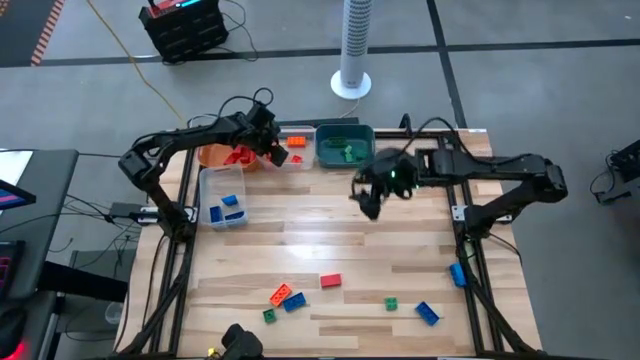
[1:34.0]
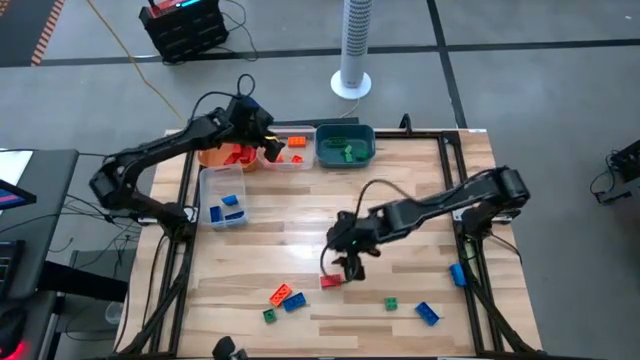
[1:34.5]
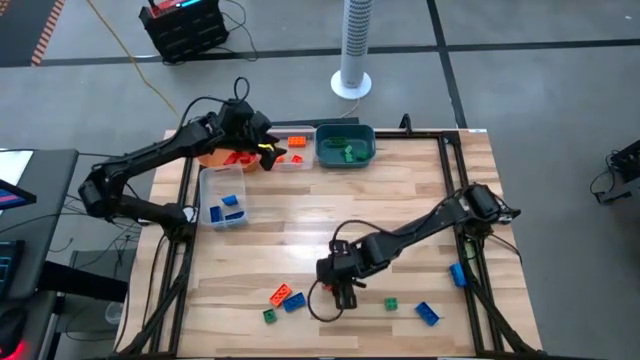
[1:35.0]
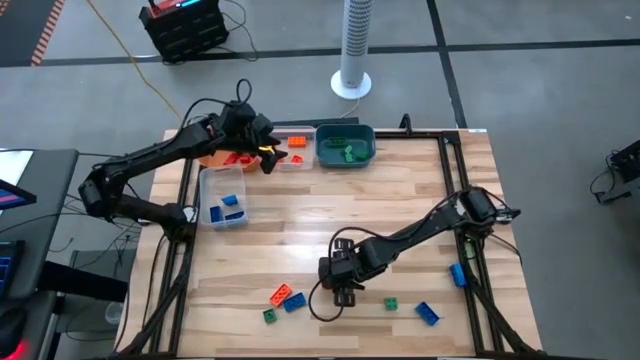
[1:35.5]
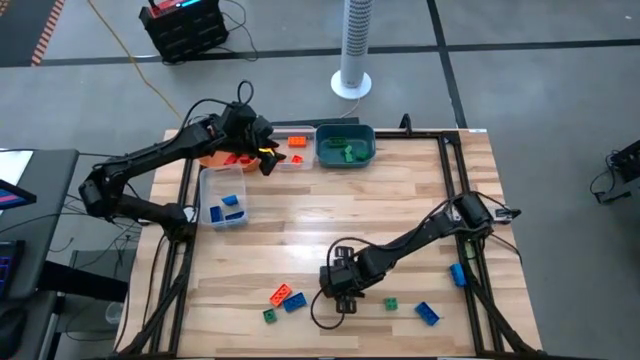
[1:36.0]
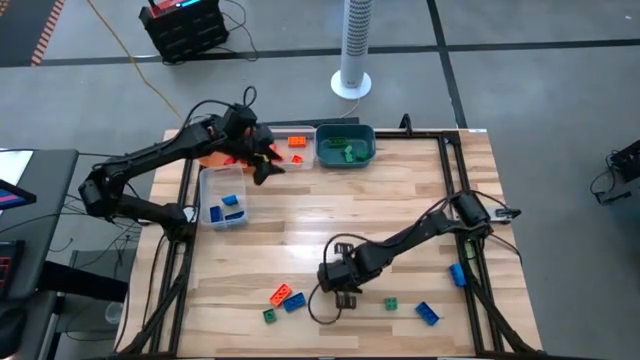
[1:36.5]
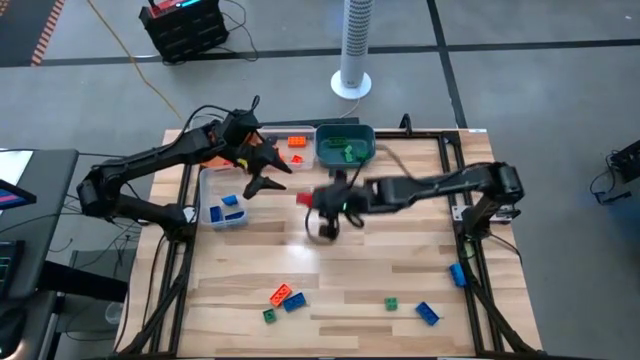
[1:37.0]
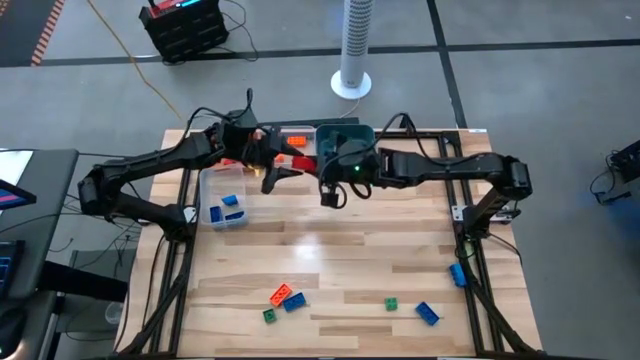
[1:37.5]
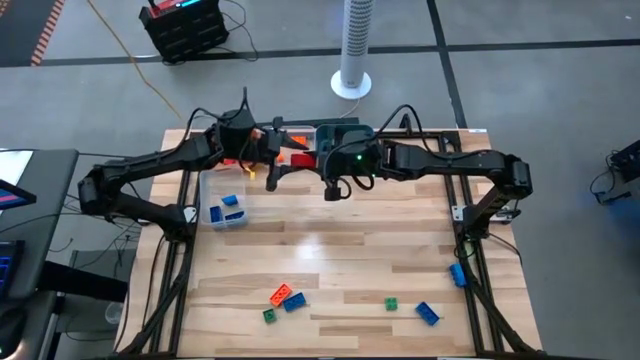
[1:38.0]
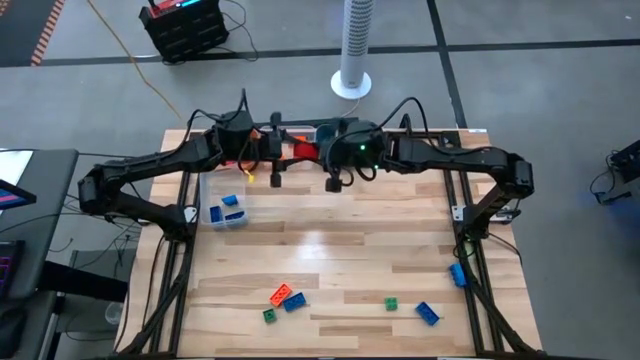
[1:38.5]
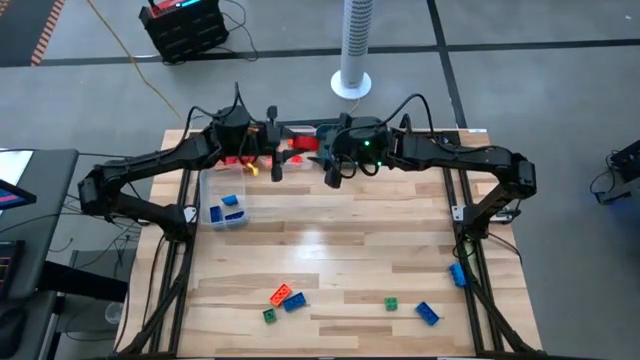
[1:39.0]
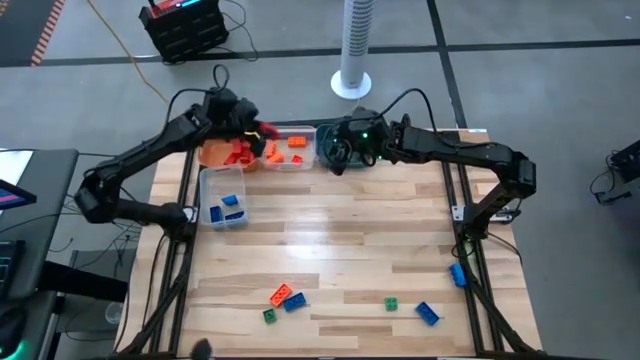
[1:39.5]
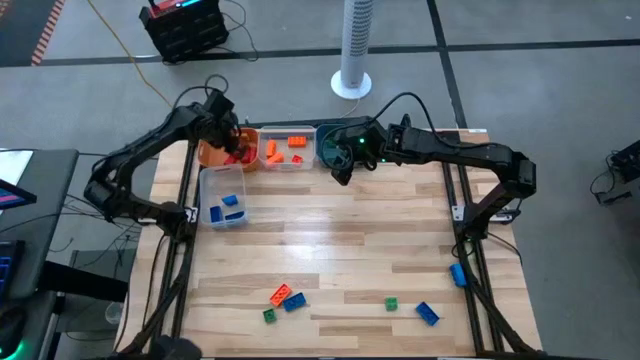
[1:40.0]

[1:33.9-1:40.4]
Task: Sort blocks
Put the red block into the orange bin

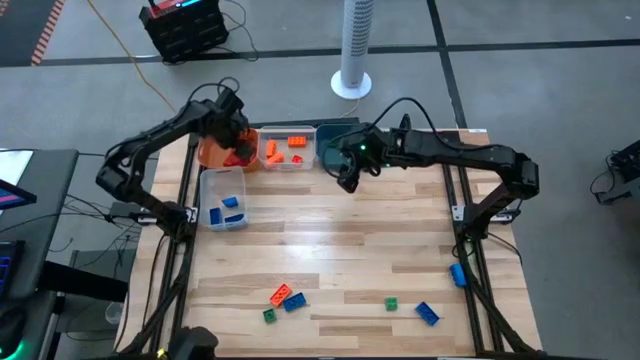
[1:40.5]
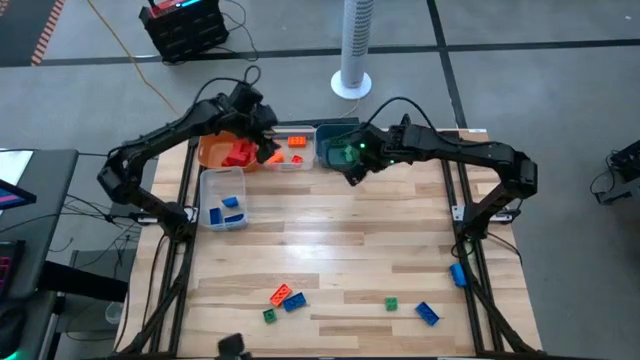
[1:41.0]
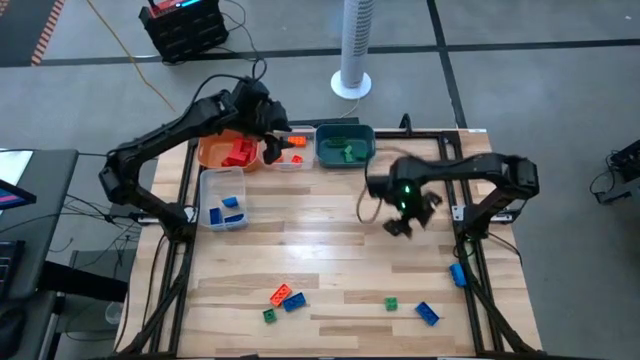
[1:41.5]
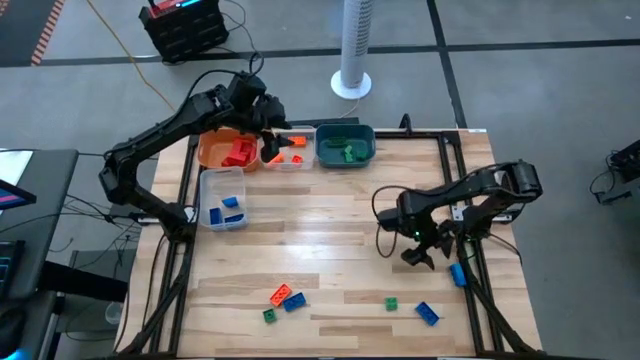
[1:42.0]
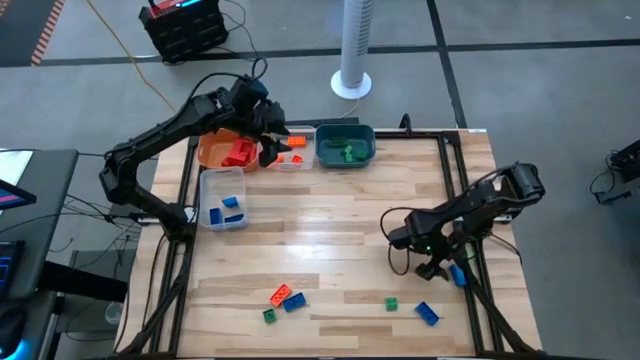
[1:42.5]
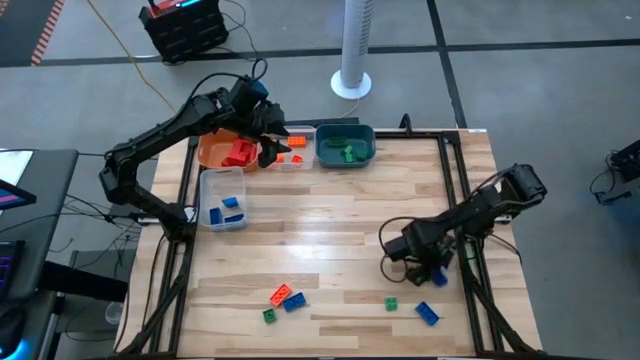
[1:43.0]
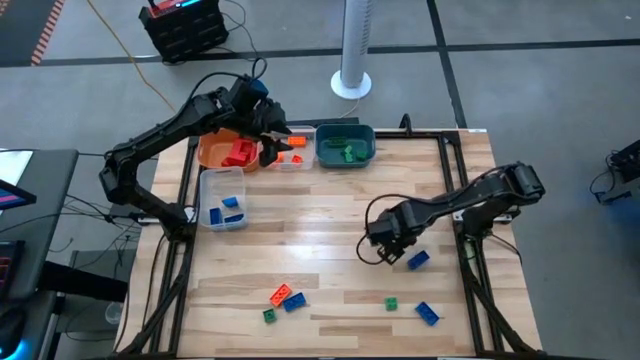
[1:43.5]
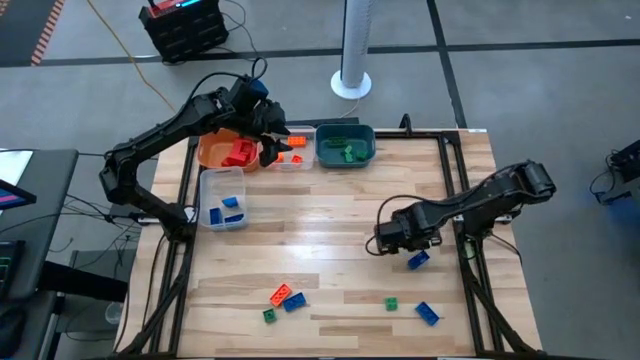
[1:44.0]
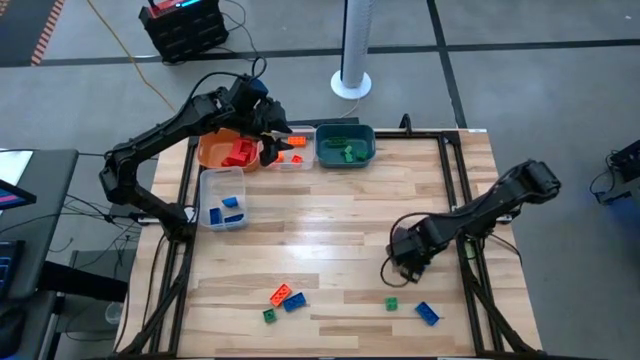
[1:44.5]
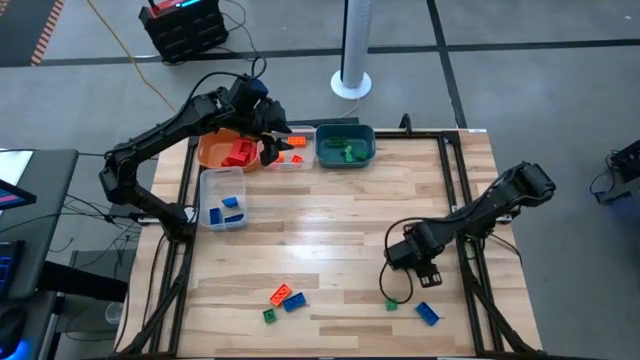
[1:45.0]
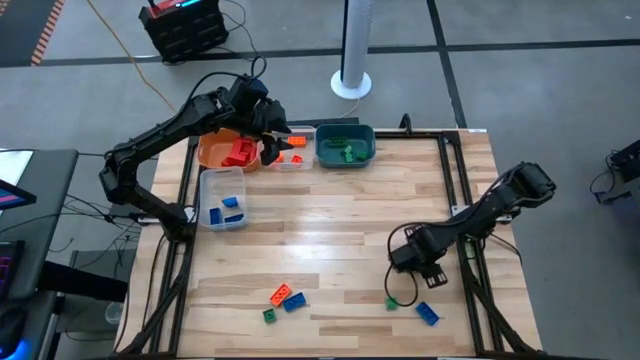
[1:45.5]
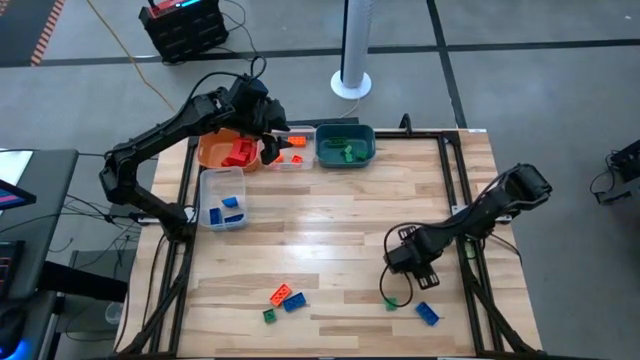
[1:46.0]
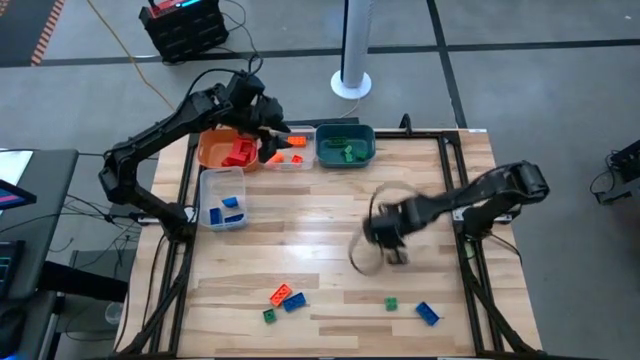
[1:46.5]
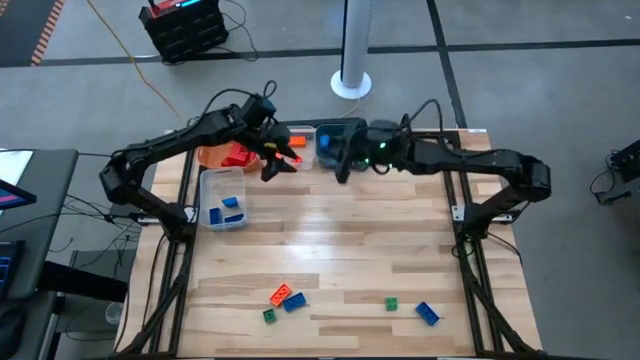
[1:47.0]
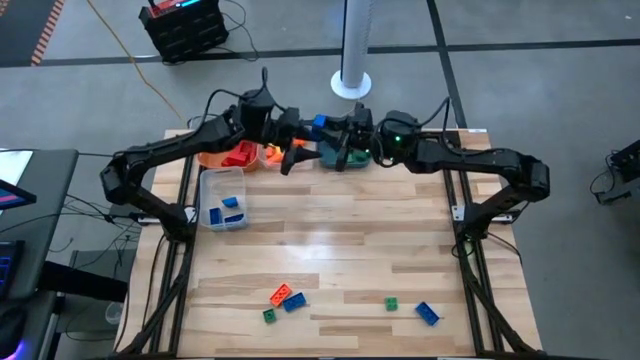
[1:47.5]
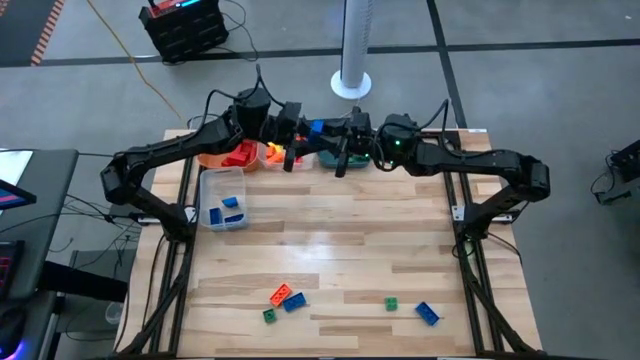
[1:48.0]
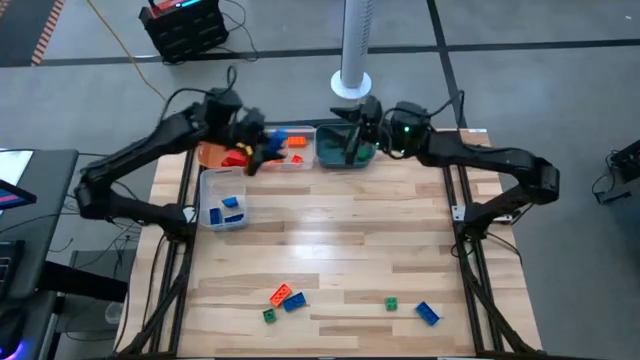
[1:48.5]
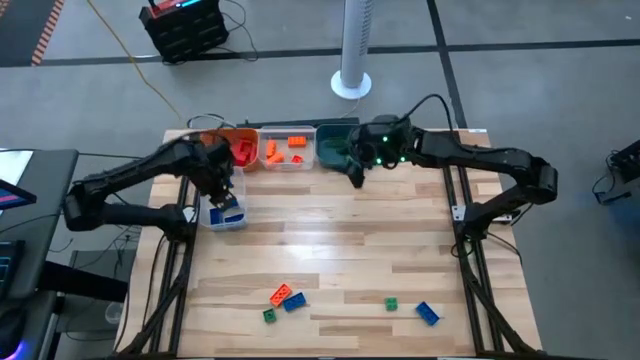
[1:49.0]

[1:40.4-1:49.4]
Put the blue game piece into the bottom transparent bin

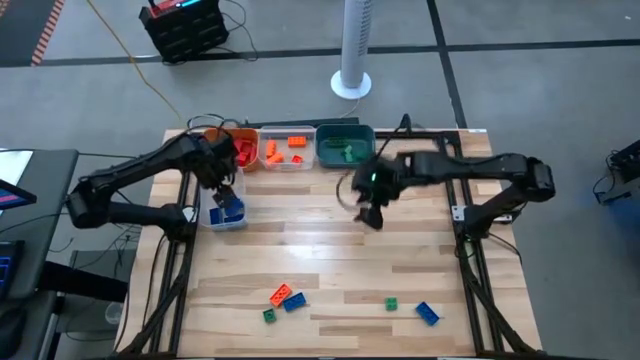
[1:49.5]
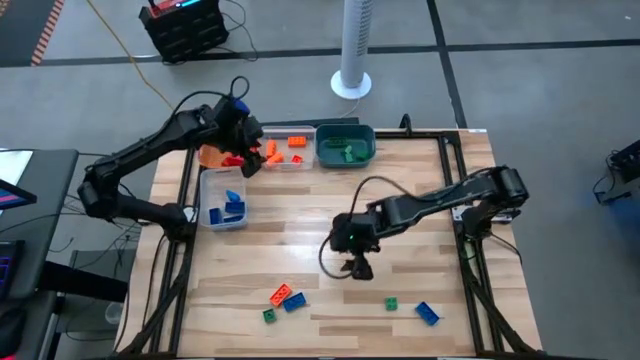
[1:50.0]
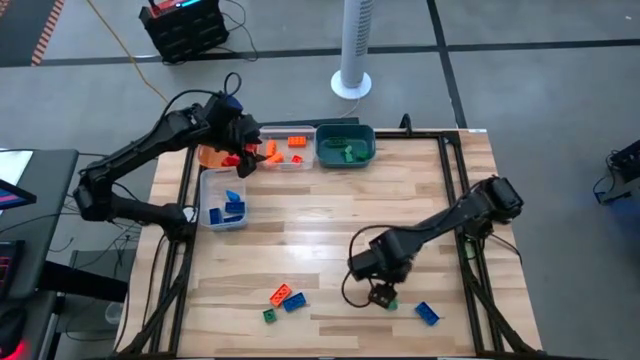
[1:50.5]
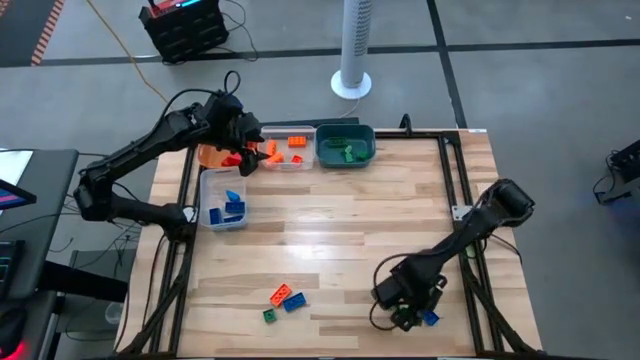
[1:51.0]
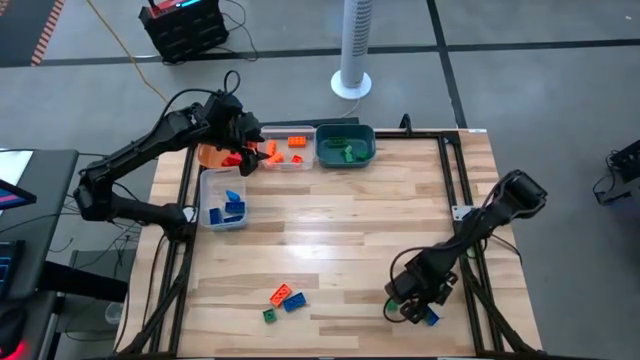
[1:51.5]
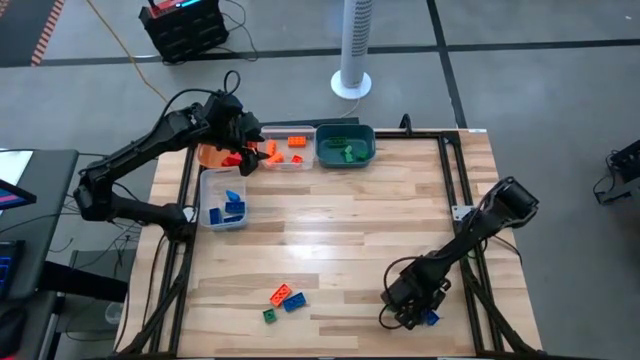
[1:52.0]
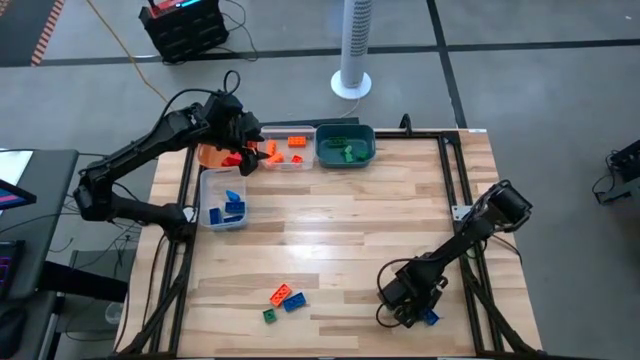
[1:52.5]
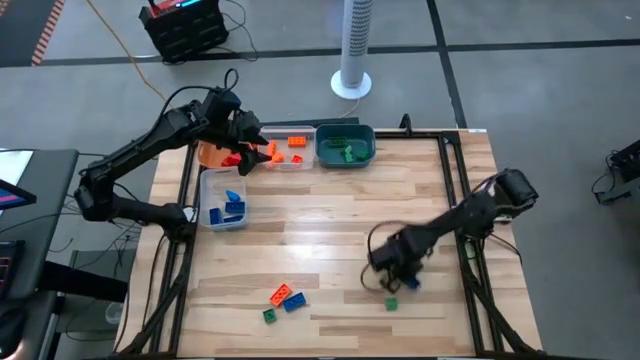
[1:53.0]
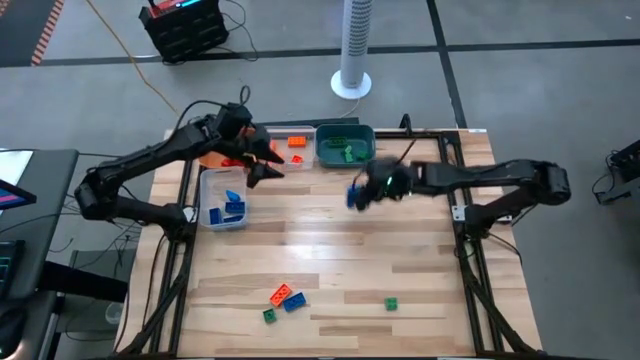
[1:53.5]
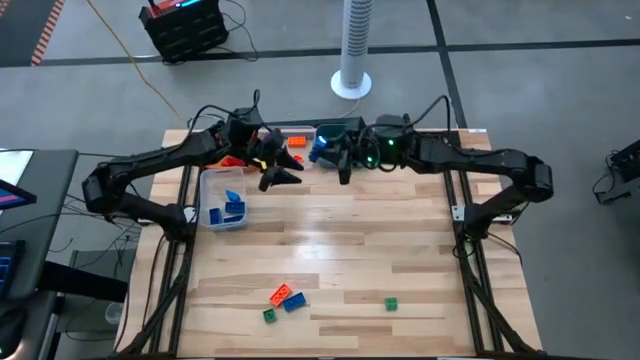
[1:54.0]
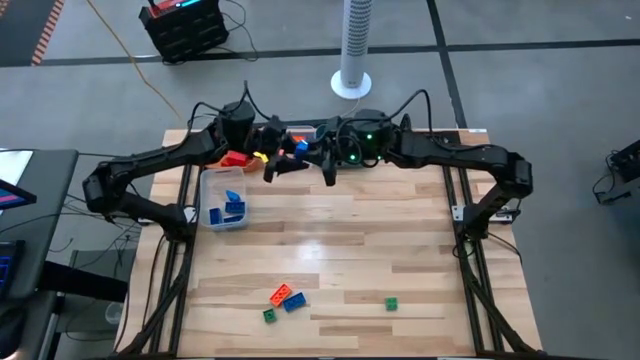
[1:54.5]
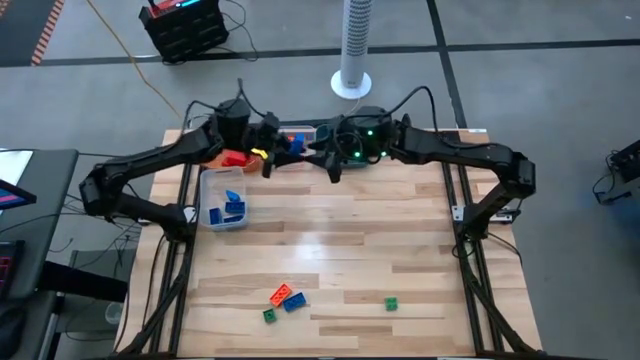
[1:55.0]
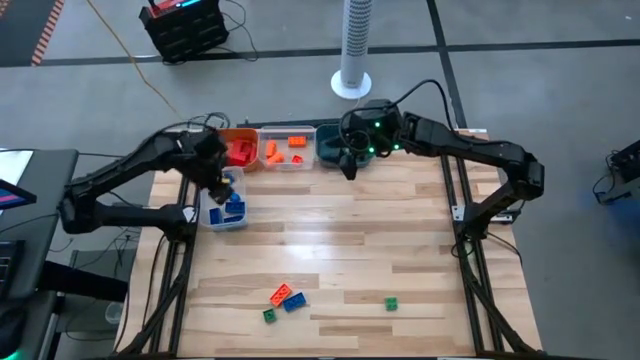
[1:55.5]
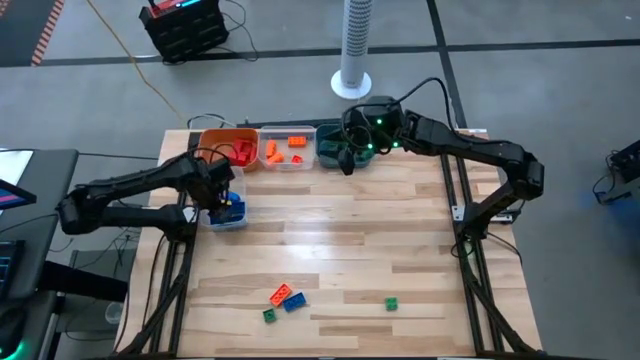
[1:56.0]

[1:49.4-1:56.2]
Put the blue game piece into the bottom transparent bin
